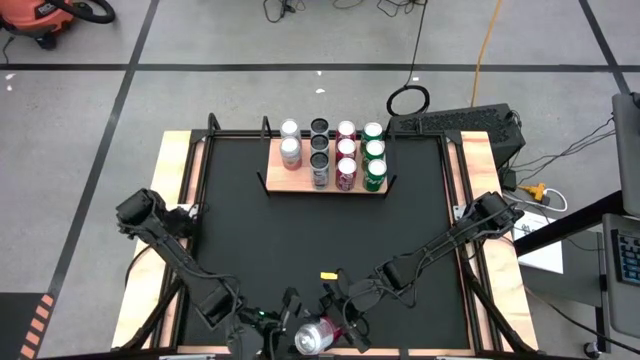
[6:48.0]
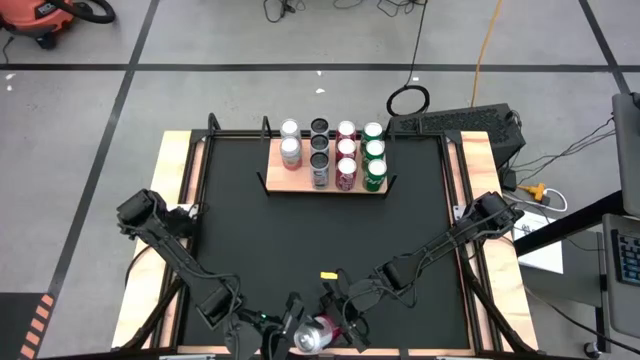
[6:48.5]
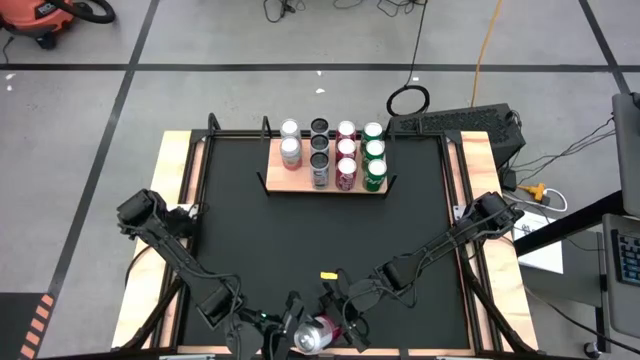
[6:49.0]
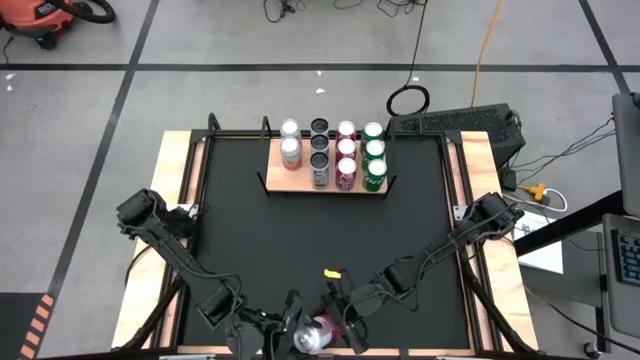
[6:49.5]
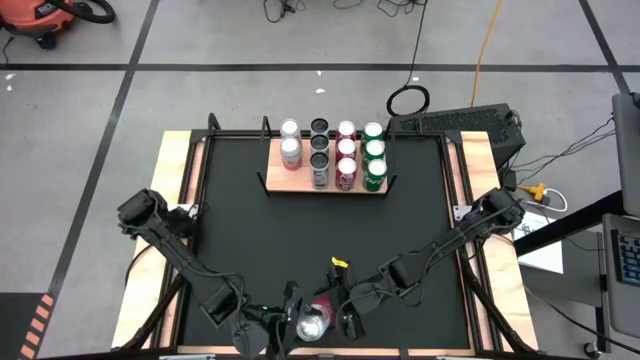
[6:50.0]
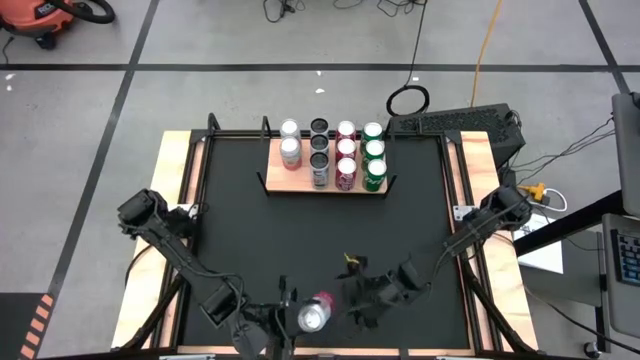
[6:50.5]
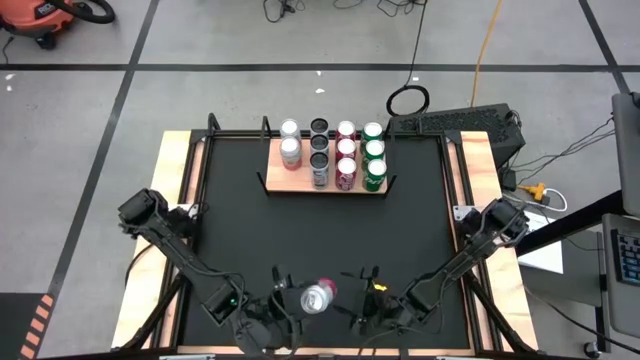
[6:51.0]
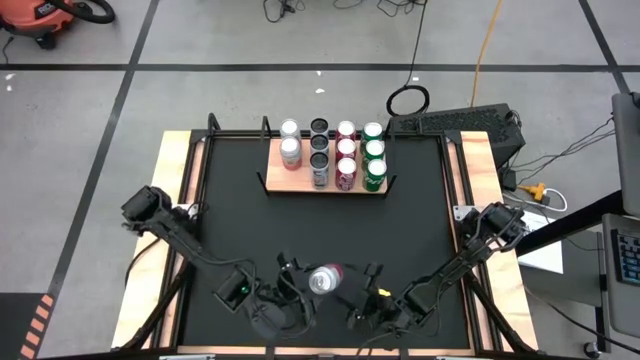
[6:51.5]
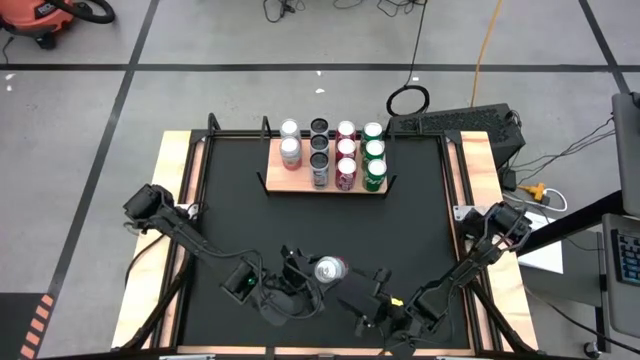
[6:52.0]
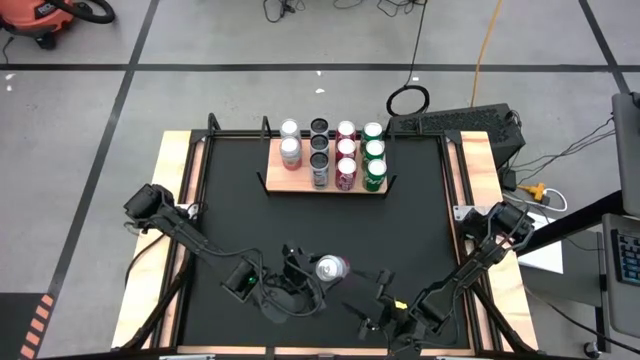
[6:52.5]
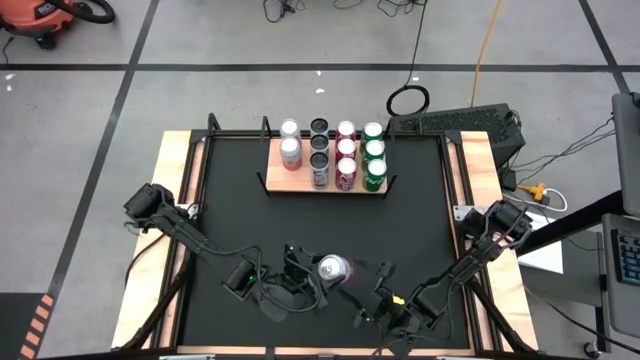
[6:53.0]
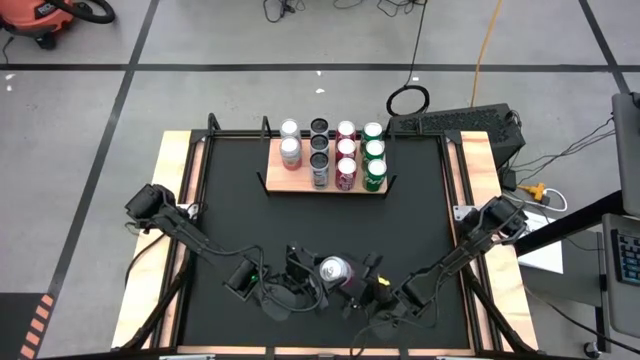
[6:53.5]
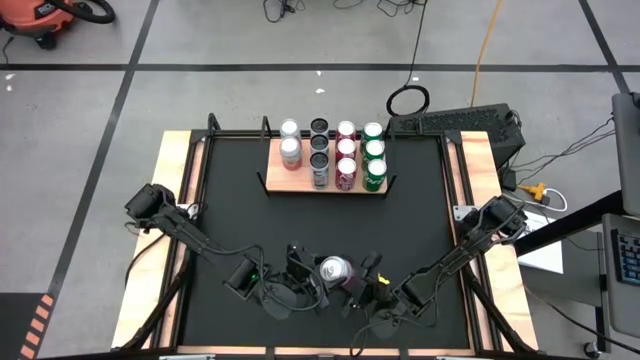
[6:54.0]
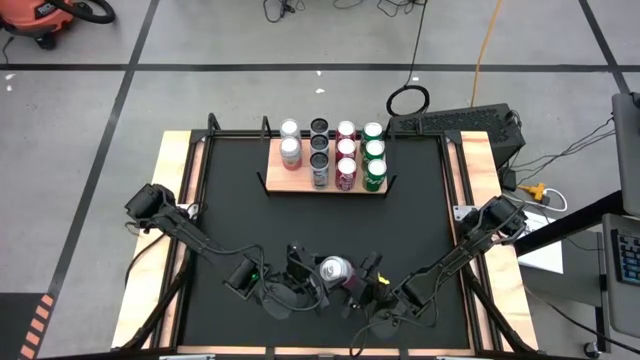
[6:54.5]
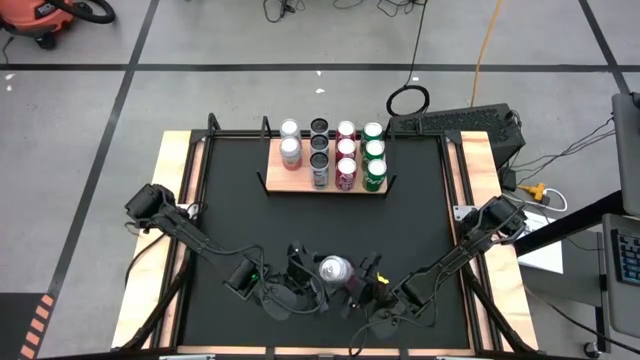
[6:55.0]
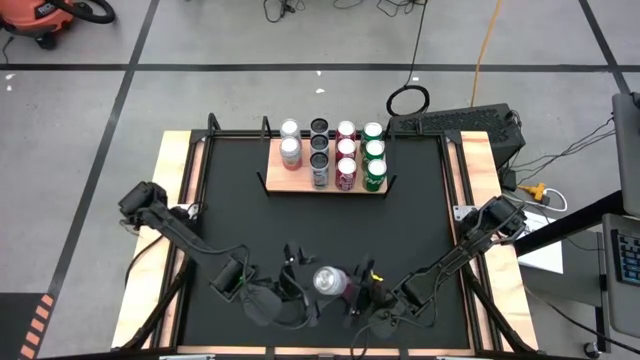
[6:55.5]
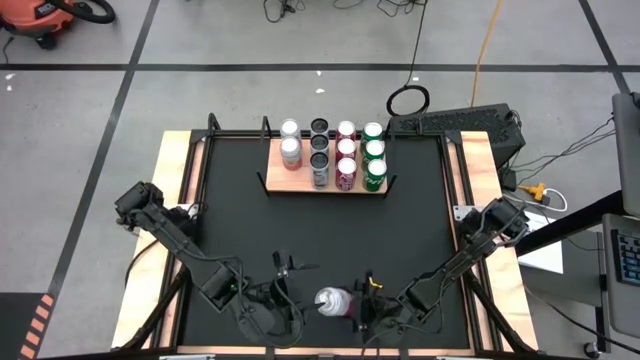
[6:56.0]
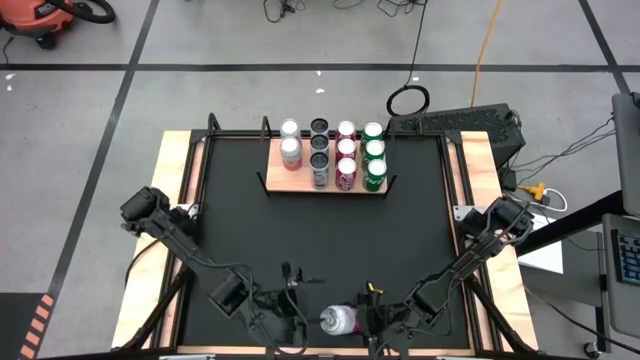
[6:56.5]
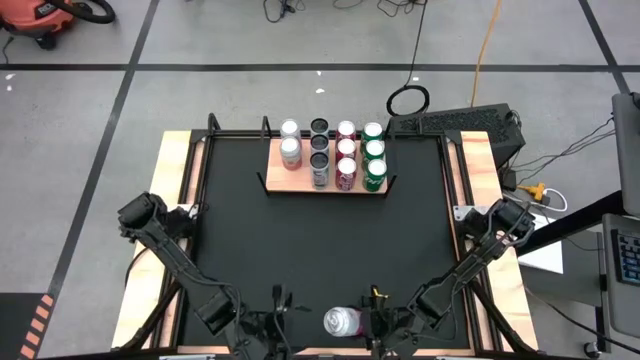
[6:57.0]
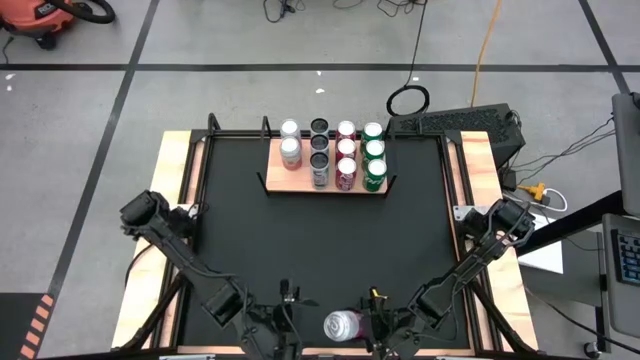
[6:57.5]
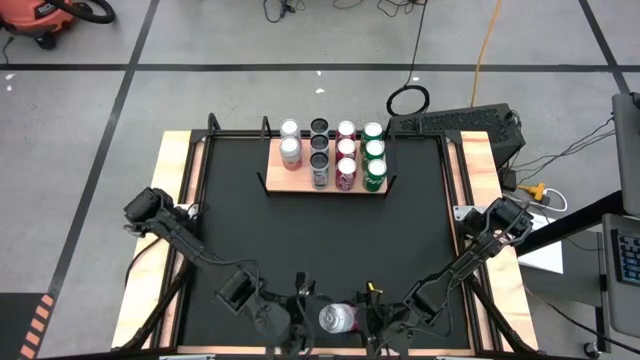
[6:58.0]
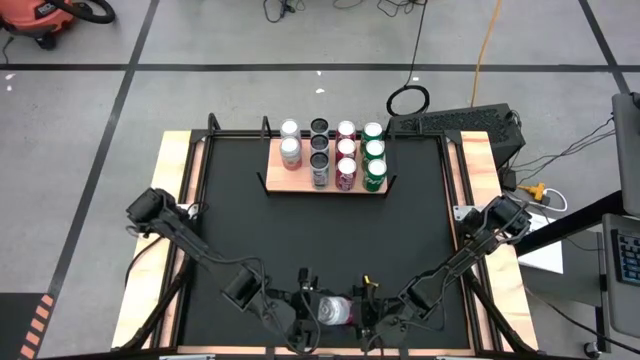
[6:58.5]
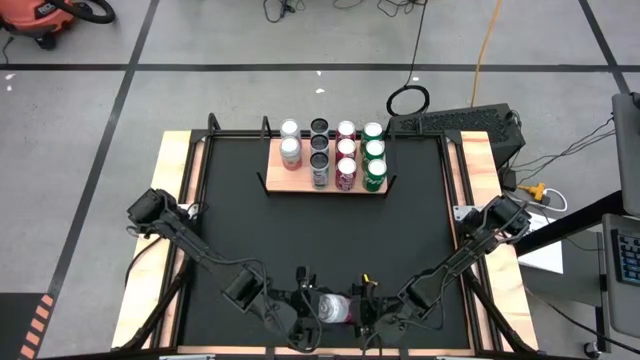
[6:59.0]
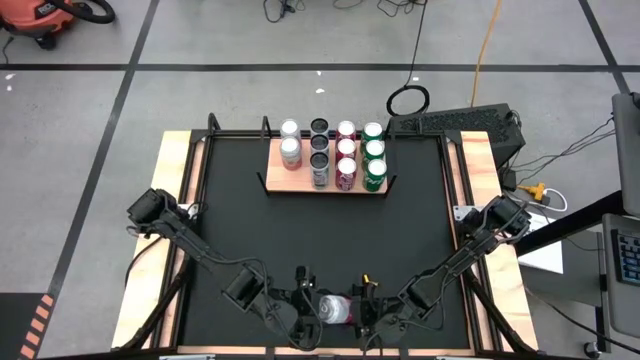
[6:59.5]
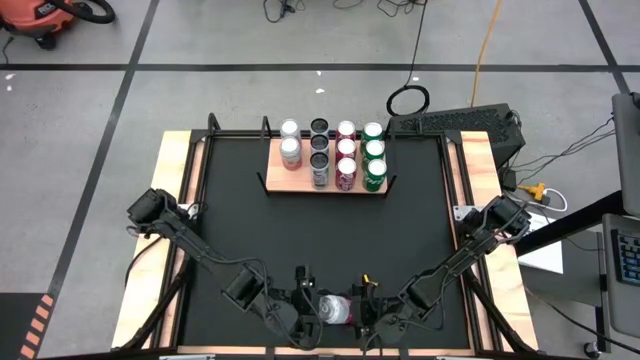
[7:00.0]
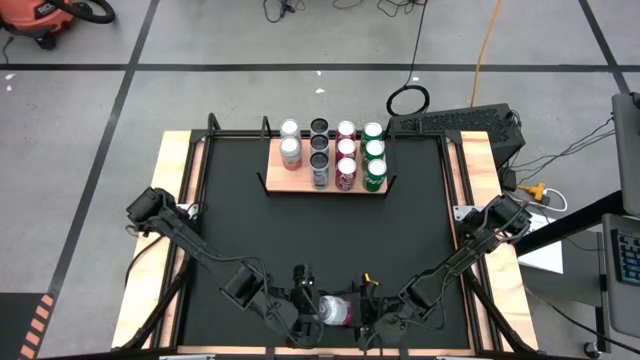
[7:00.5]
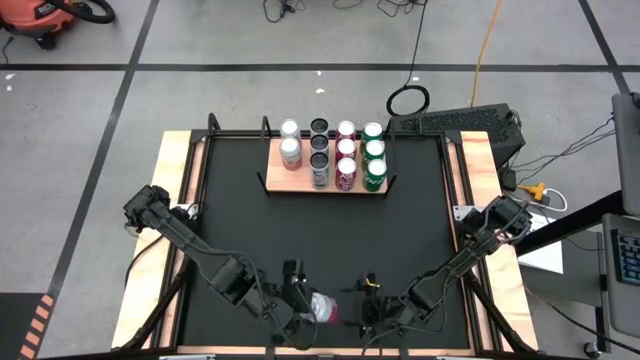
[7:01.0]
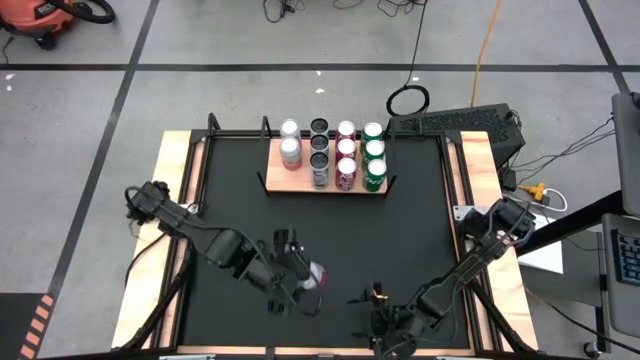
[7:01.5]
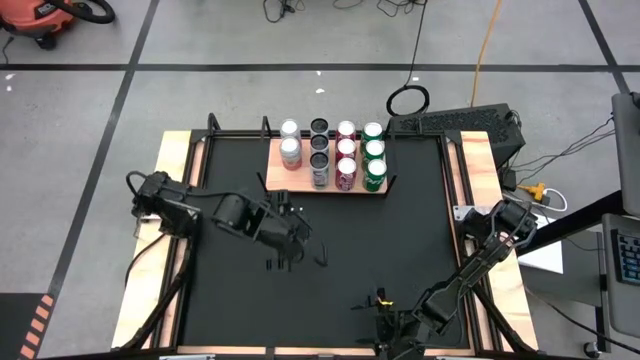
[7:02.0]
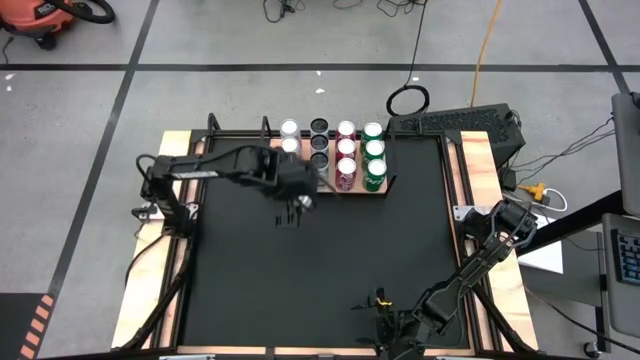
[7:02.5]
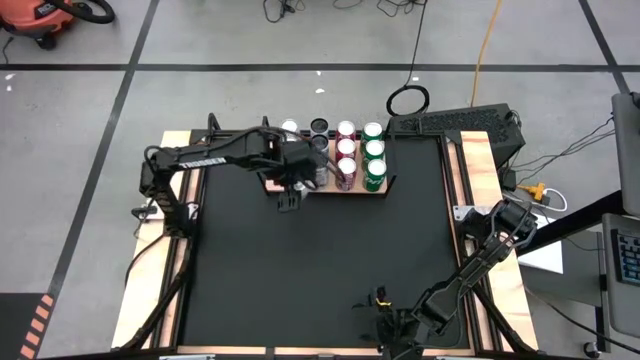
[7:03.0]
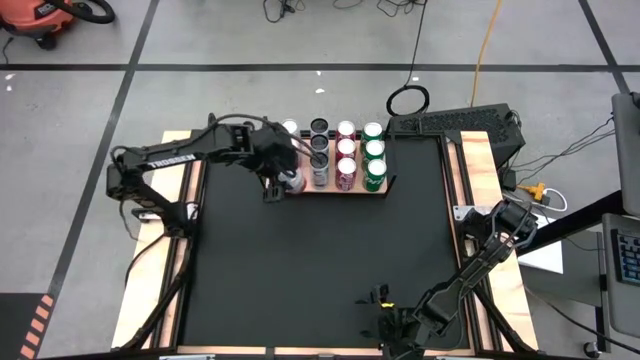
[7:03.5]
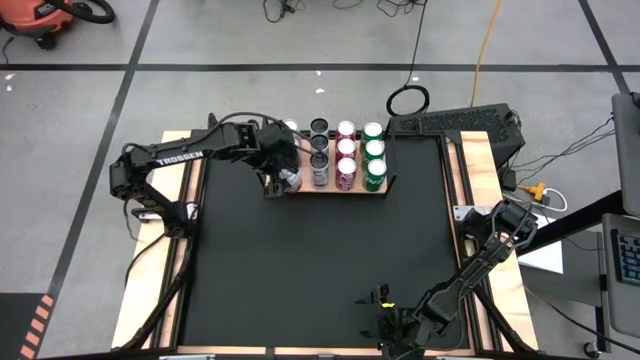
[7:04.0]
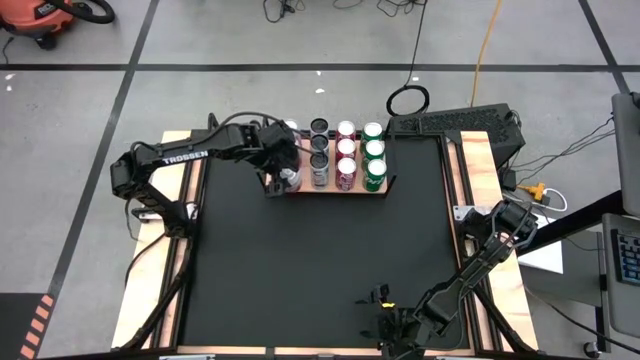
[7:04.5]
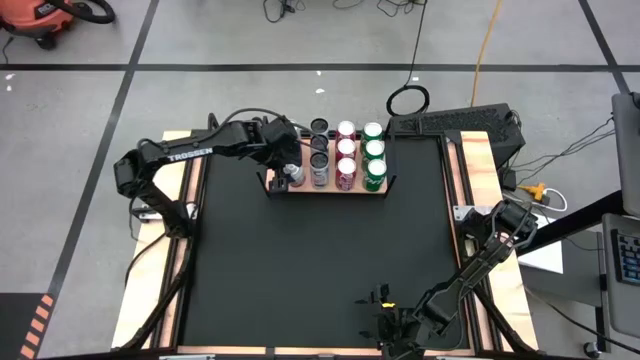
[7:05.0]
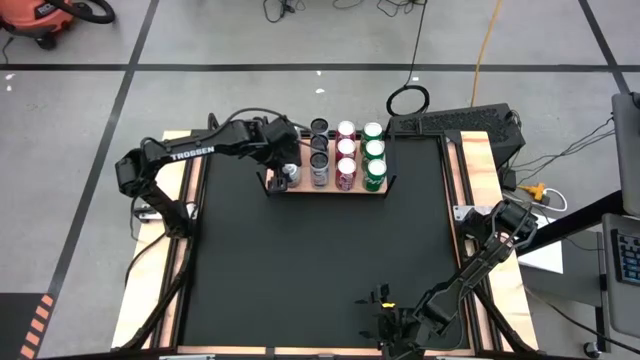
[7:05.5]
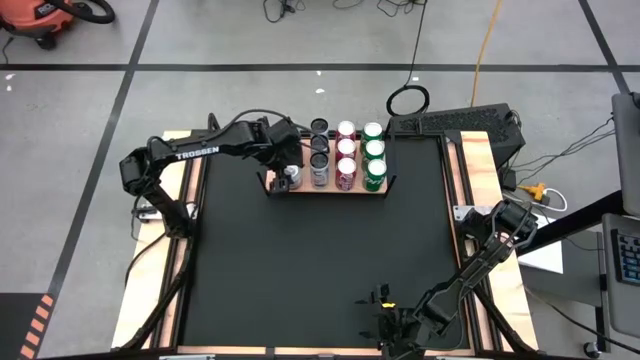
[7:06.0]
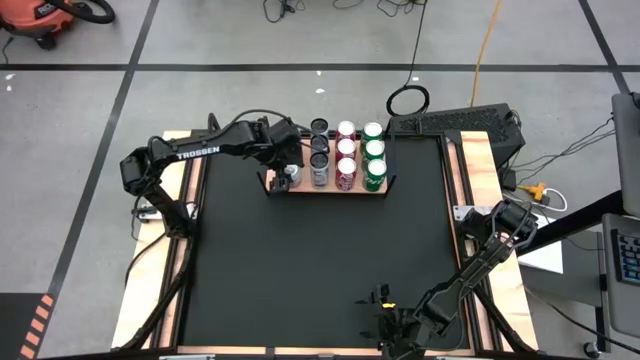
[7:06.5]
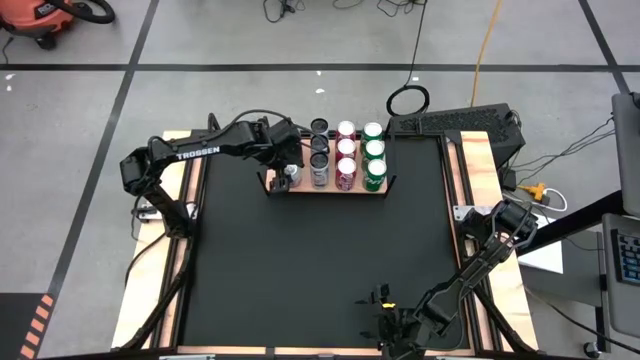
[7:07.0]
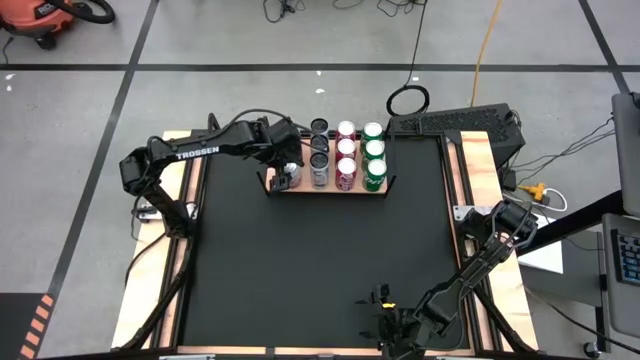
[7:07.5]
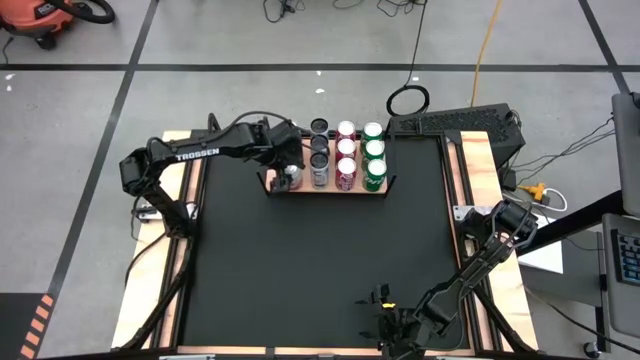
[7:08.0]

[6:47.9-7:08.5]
Task: Place canned beverage on shelf
Put the pink soda can on the shelf

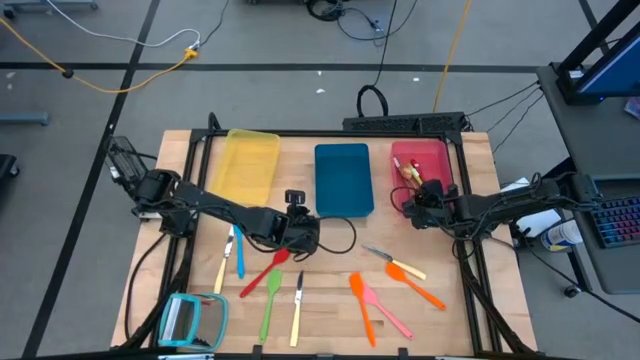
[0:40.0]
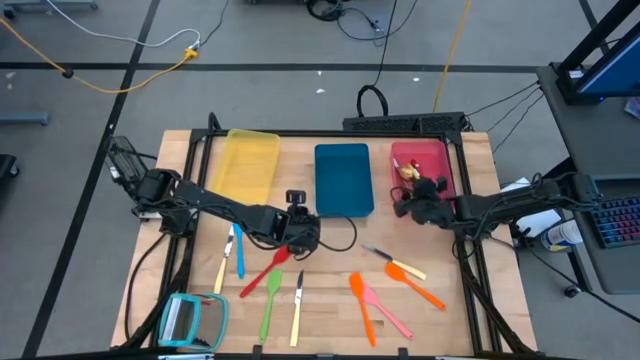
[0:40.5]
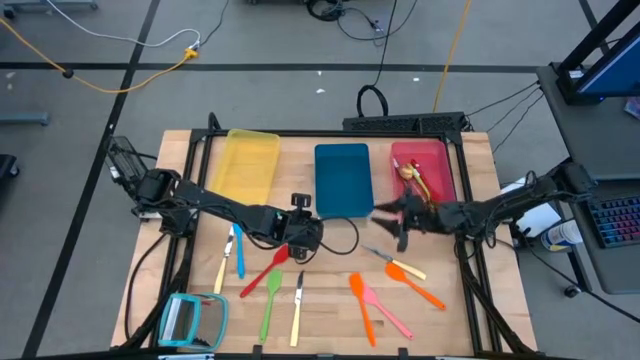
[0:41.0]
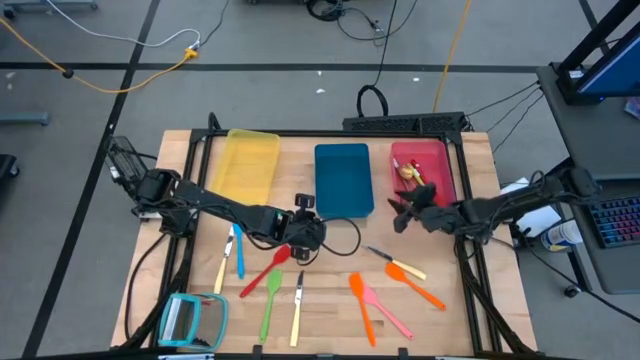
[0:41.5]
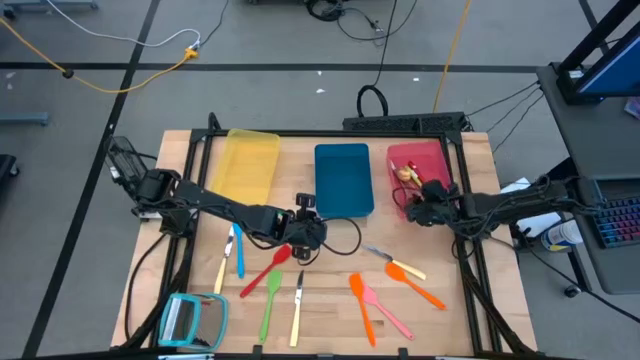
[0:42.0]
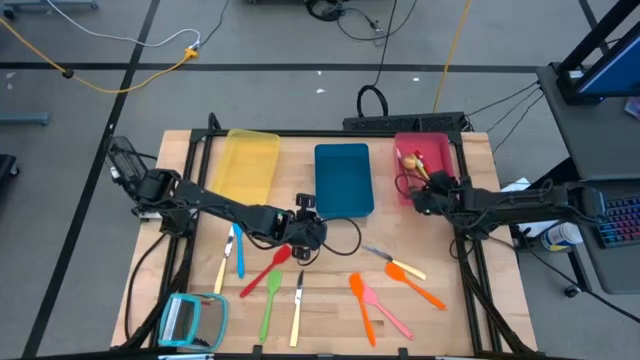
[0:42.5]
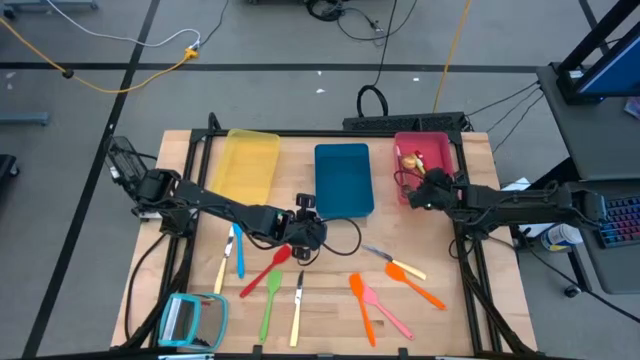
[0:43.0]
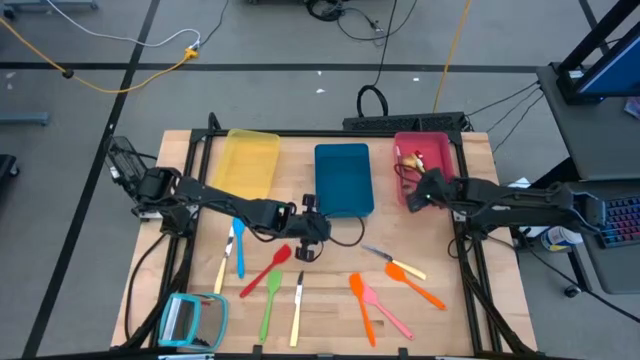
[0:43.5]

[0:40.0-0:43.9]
Task: Pick & Place Kitchen Items
Adjust the red bin
